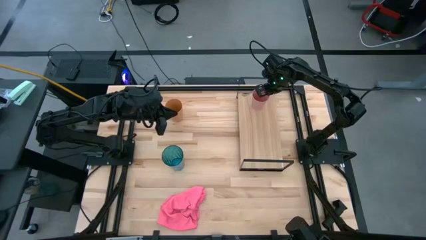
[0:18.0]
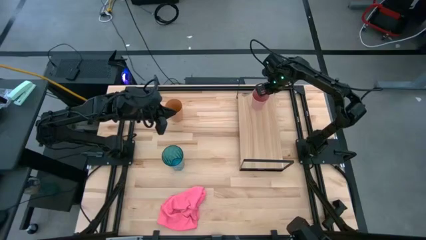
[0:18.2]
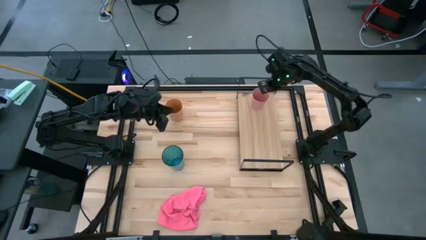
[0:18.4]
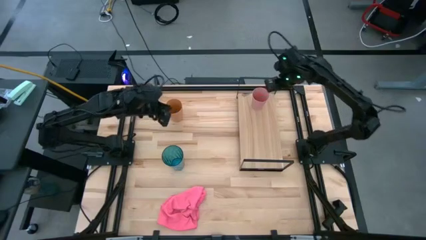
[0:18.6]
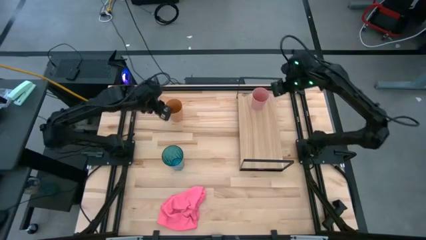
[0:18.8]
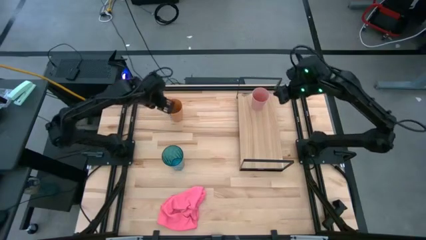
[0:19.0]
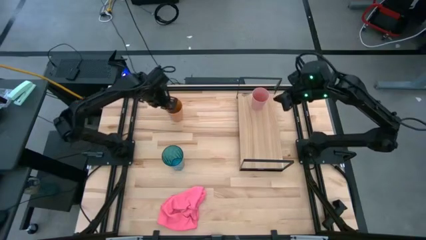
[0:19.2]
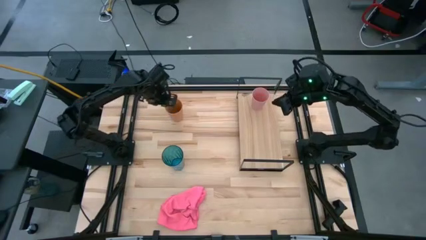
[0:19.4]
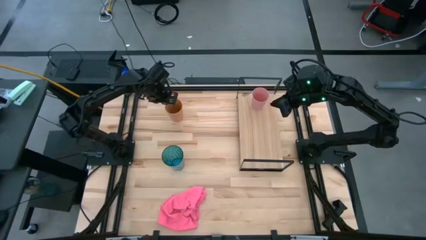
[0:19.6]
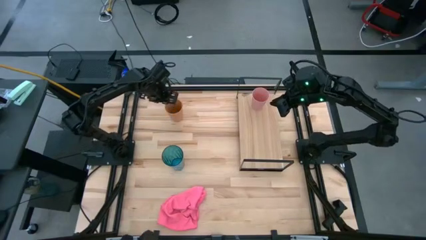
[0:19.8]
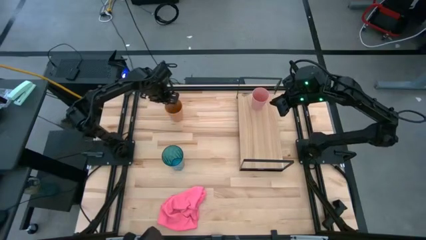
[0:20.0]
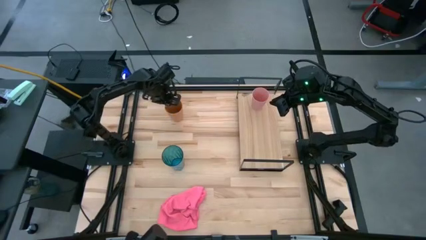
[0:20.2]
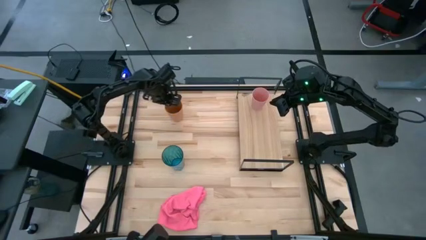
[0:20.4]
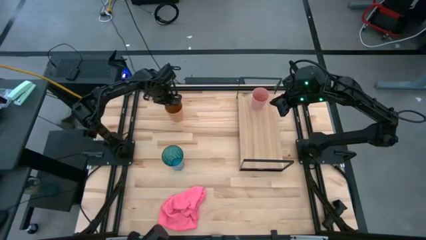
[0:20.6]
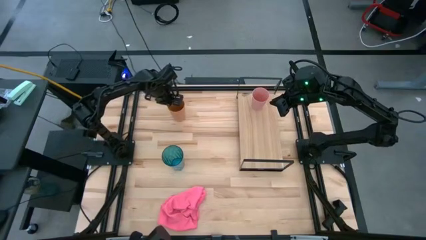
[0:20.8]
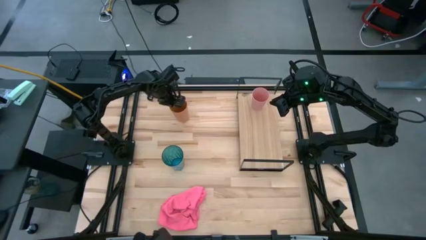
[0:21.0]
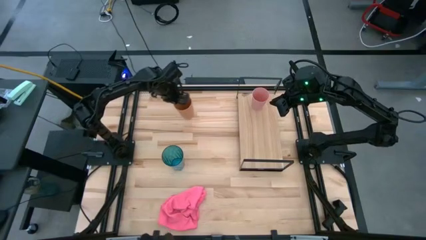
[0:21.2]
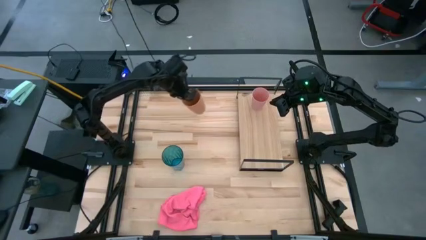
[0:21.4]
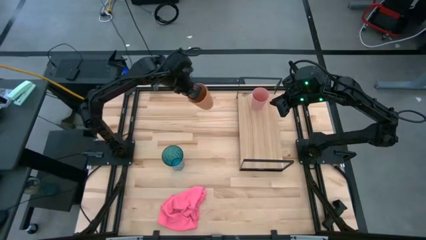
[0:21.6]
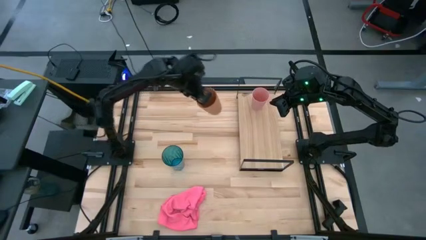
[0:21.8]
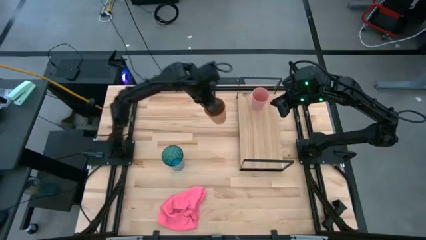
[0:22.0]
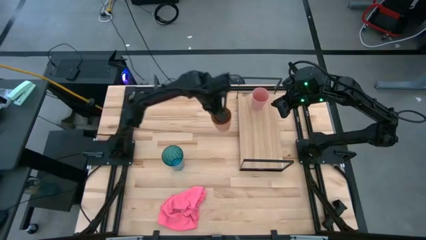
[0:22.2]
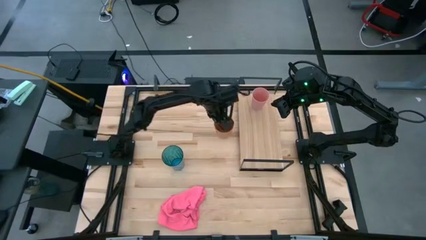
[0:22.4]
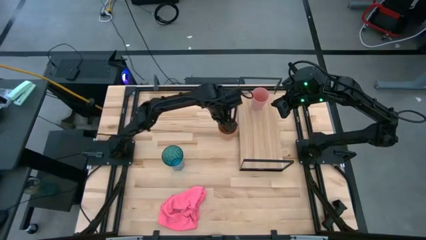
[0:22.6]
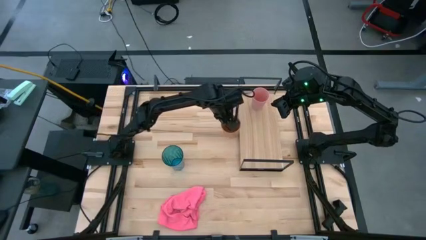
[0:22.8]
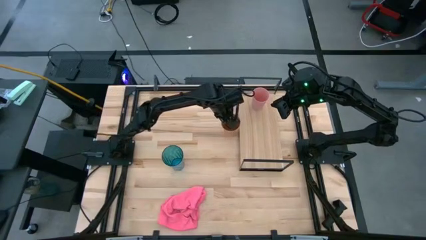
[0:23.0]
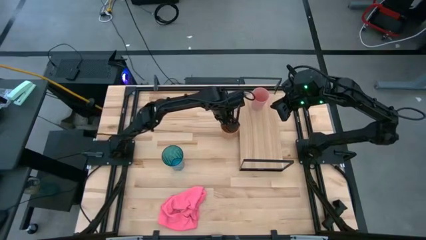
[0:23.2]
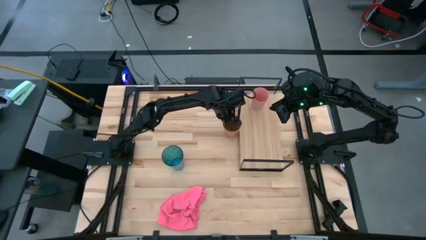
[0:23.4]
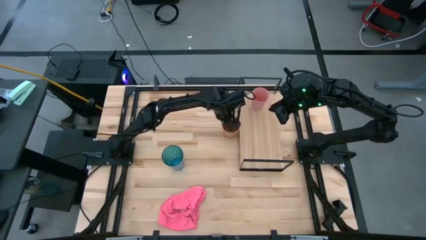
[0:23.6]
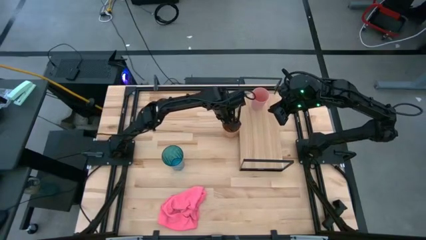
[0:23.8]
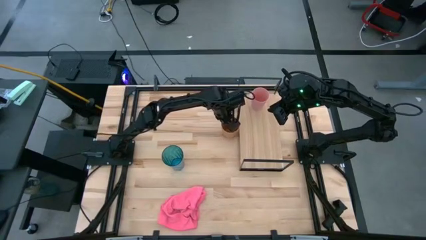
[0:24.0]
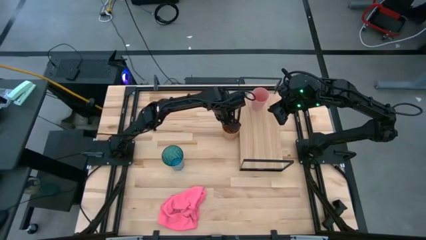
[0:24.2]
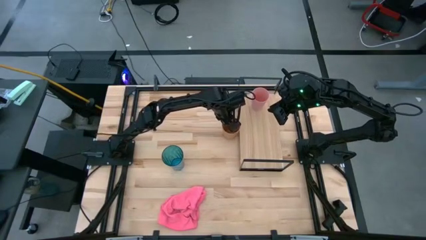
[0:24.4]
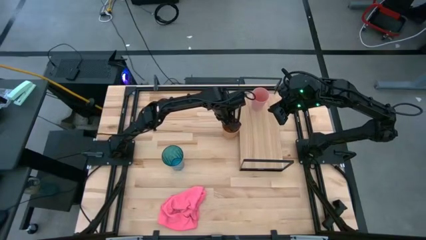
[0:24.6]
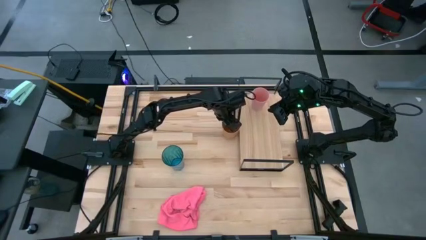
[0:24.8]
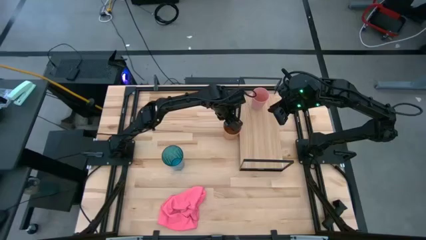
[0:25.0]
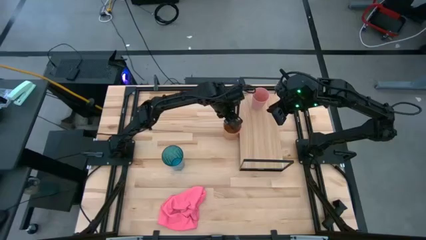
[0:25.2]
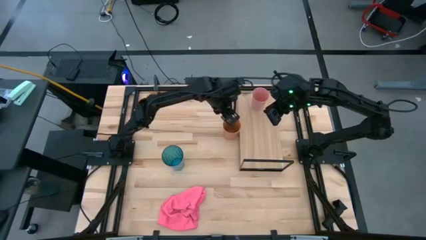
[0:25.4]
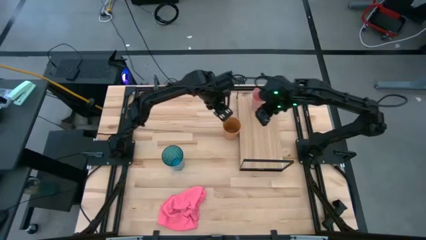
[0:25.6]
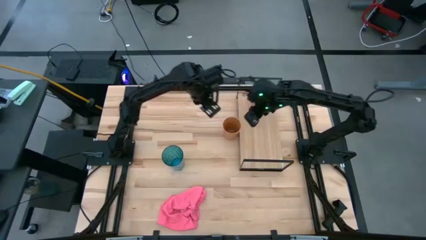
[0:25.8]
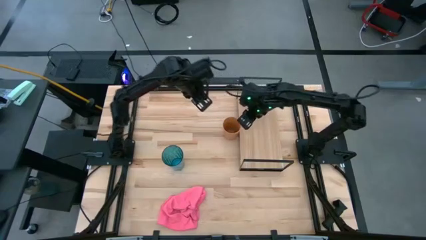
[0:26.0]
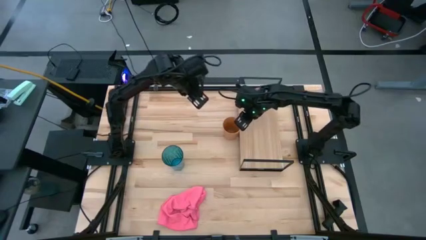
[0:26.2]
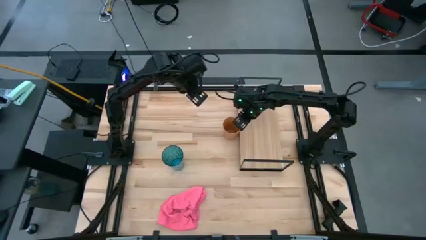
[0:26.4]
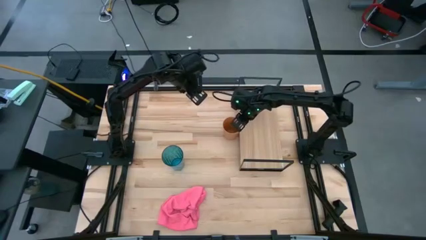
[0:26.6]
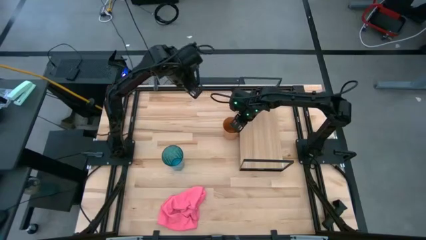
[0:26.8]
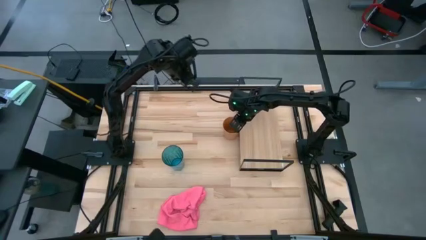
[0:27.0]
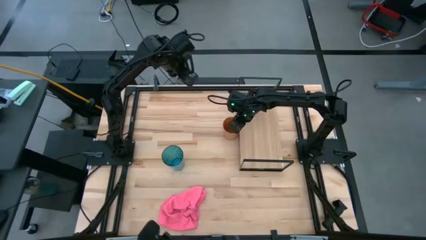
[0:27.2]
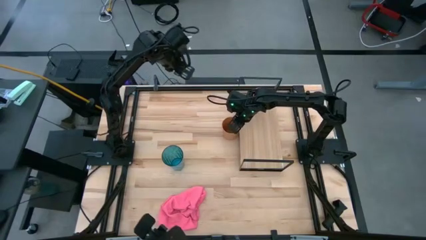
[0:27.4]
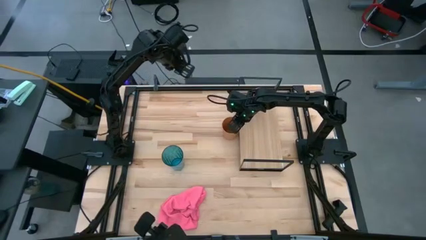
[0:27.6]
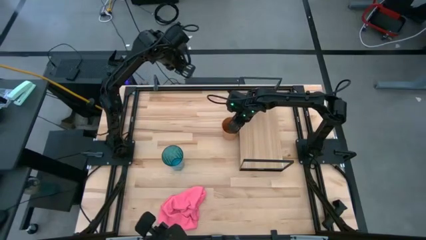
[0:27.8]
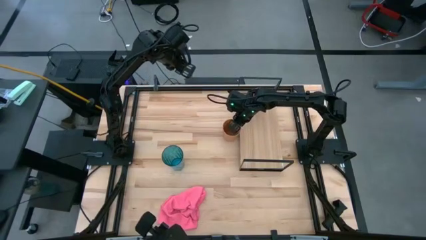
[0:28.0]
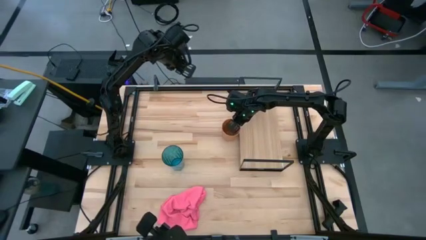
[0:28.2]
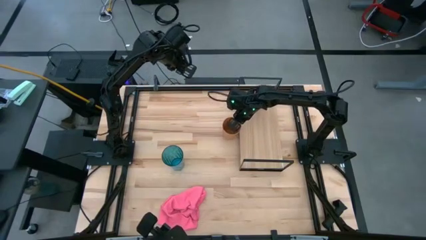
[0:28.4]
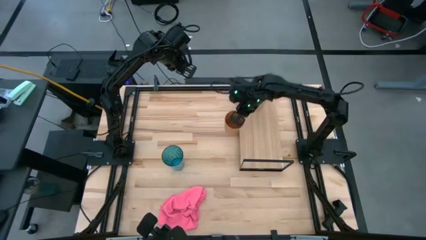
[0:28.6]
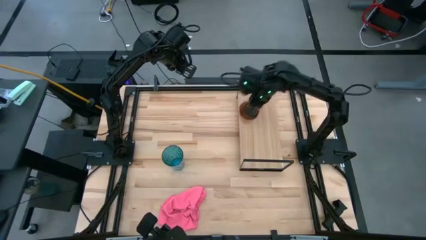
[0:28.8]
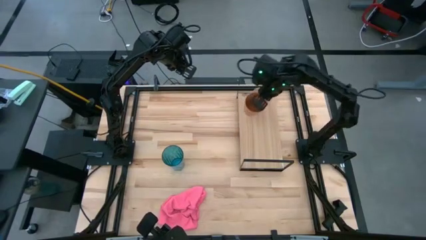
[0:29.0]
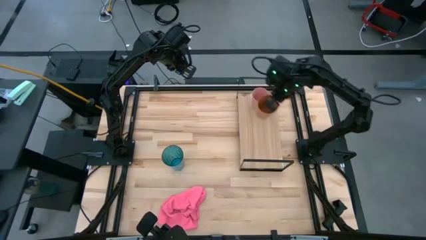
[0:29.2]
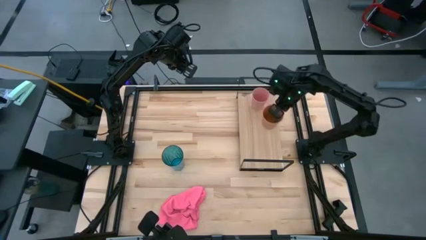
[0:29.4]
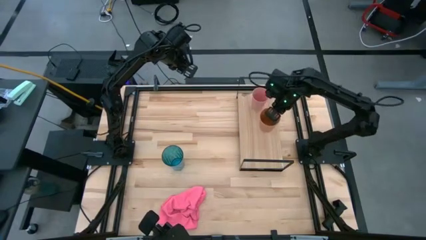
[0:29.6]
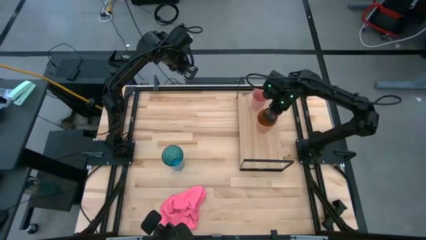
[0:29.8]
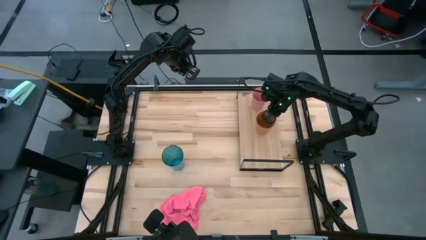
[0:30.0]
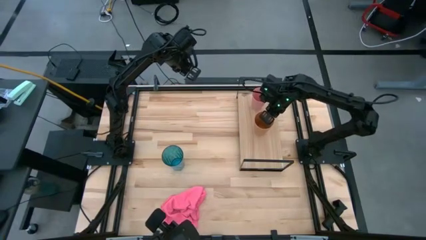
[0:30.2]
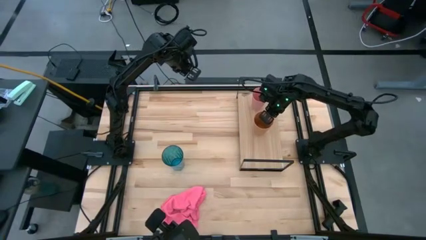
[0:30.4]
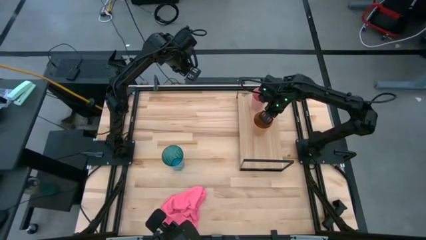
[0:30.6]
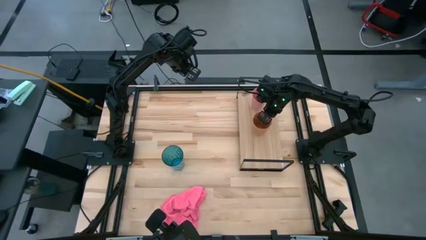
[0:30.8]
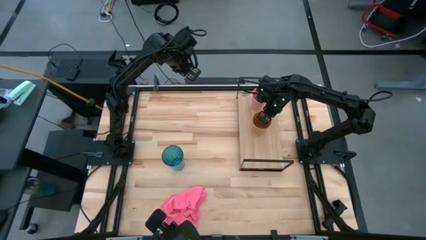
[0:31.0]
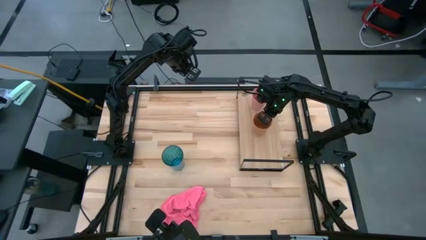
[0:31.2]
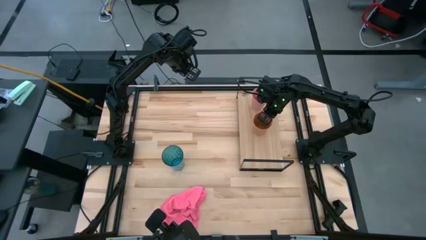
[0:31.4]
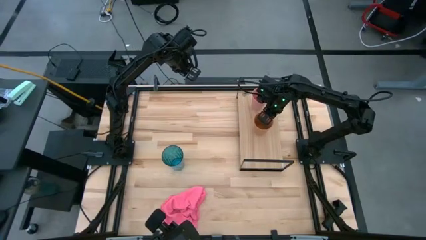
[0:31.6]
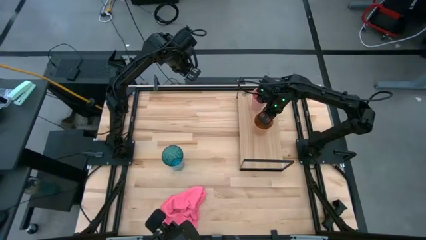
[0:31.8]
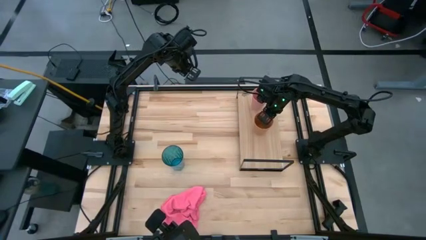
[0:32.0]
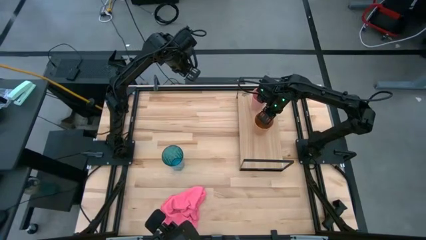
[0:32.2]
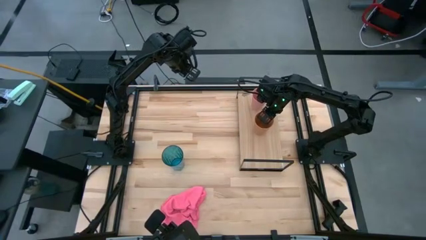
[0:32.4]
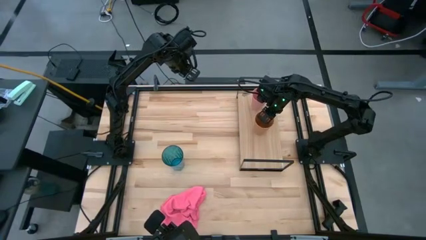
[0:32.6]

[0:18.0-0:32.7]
Task: Stack small to large cups/mugs on shelf
Put the orange cup on the shelf
